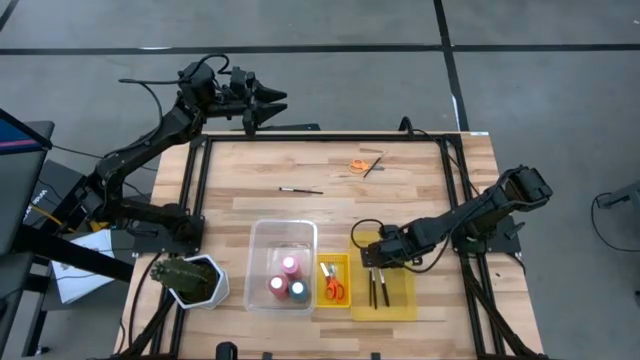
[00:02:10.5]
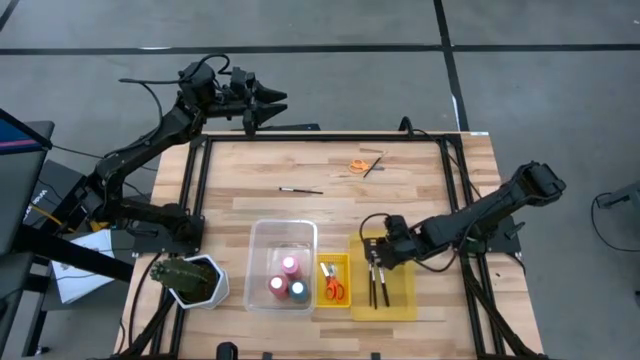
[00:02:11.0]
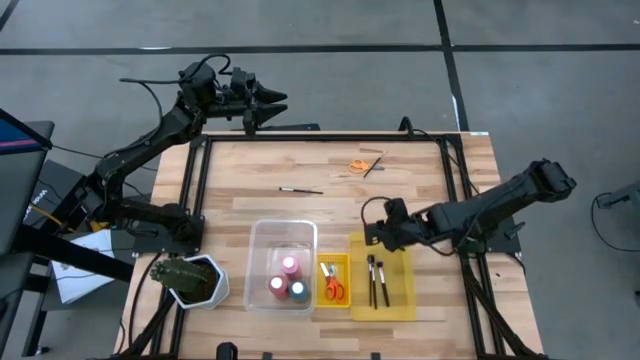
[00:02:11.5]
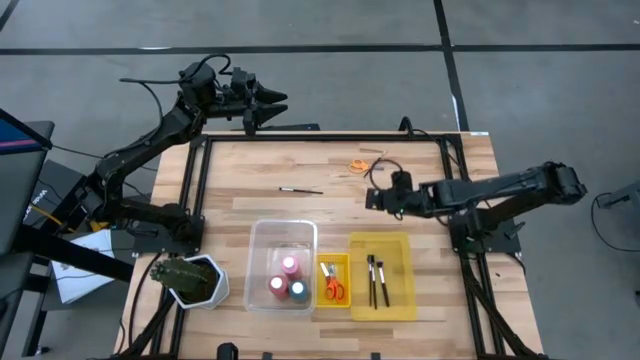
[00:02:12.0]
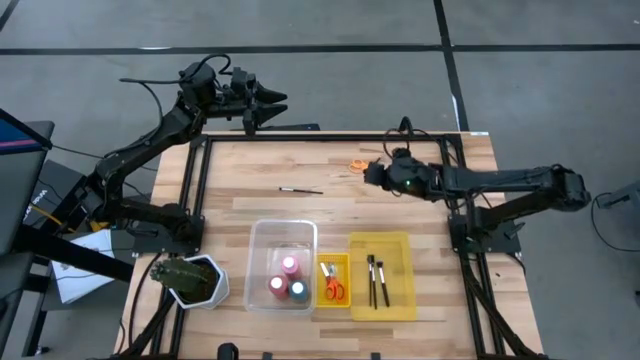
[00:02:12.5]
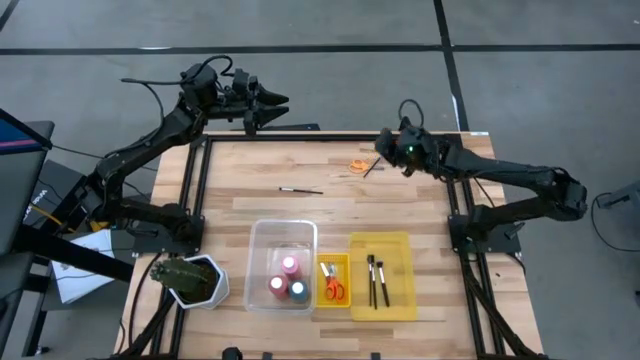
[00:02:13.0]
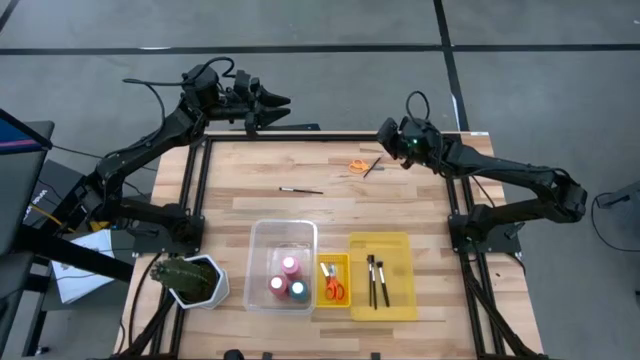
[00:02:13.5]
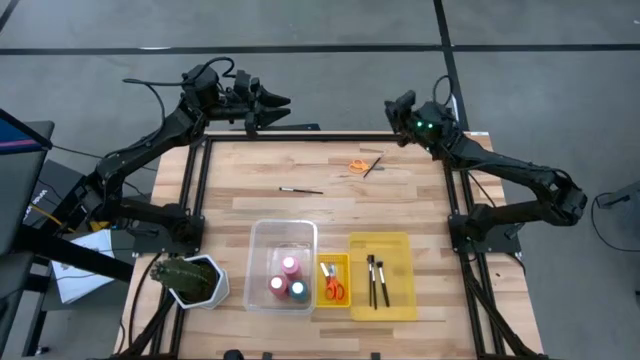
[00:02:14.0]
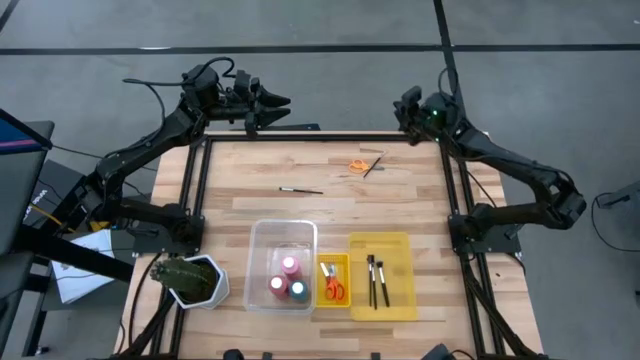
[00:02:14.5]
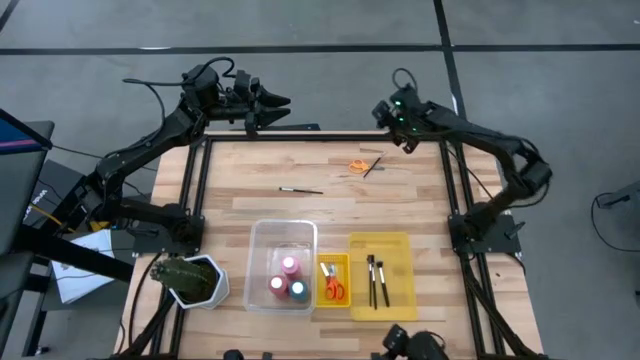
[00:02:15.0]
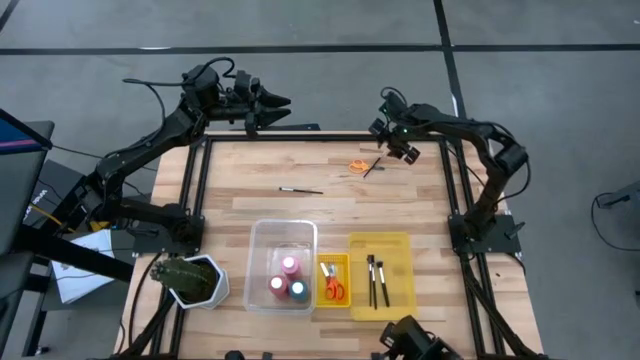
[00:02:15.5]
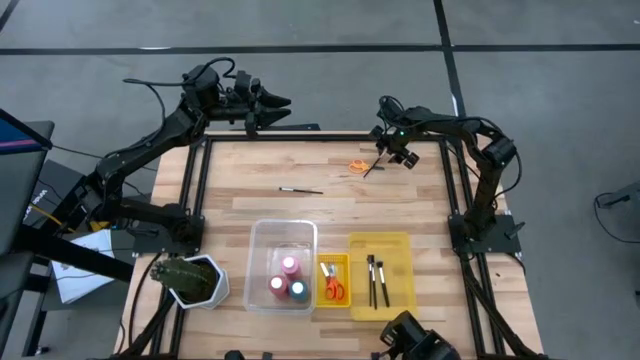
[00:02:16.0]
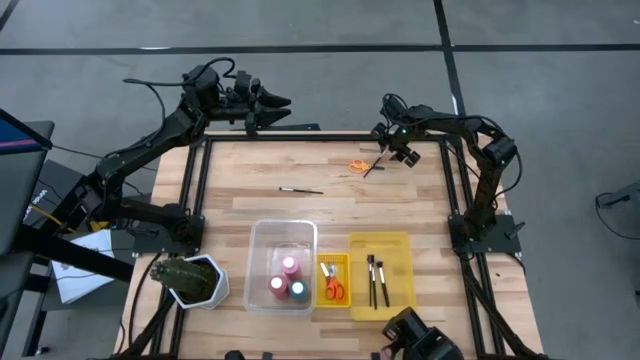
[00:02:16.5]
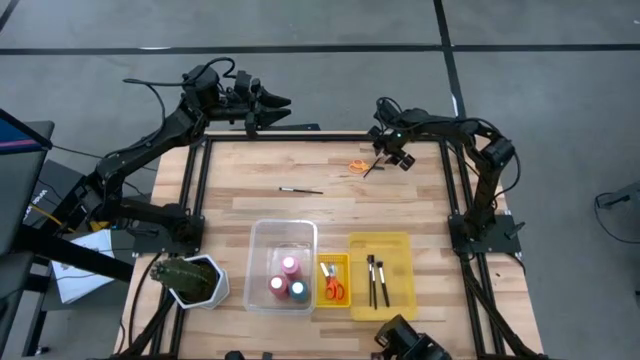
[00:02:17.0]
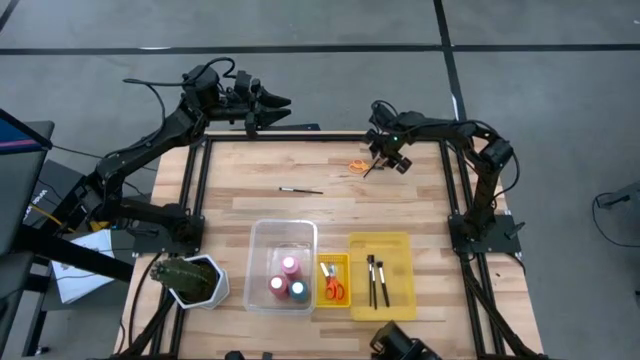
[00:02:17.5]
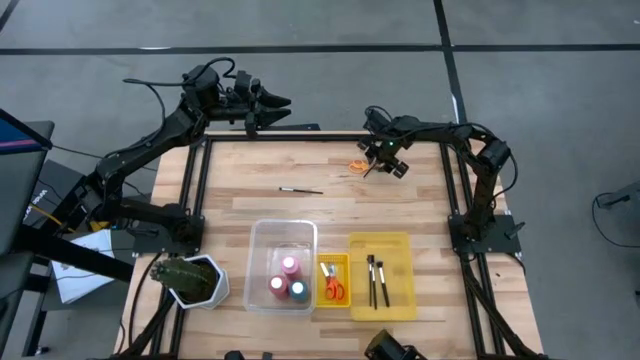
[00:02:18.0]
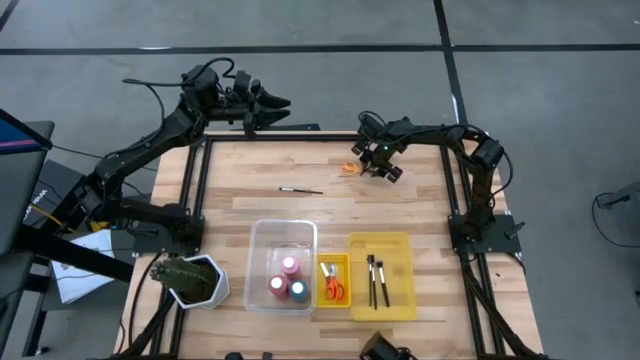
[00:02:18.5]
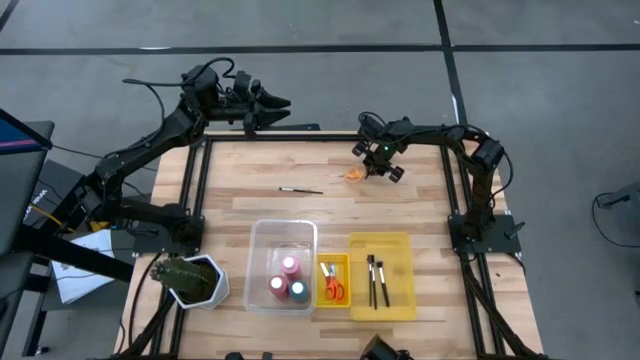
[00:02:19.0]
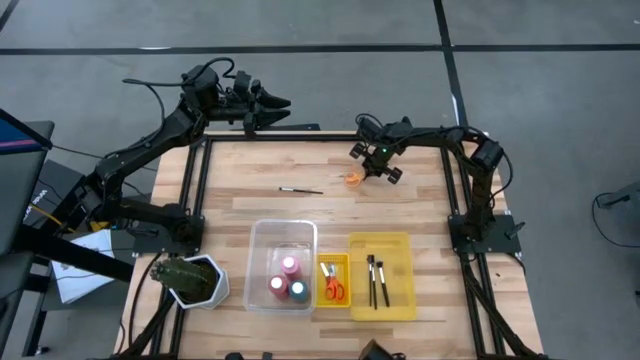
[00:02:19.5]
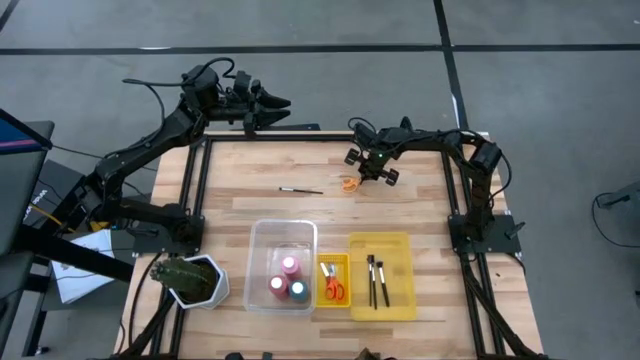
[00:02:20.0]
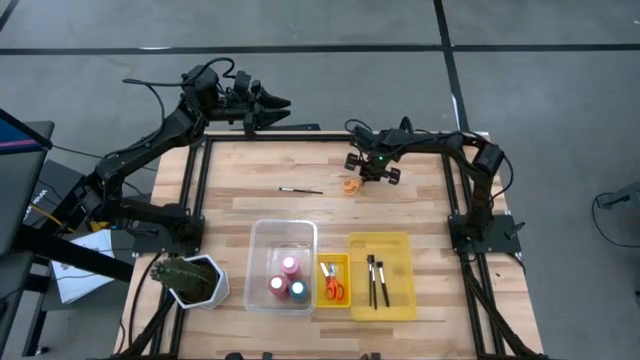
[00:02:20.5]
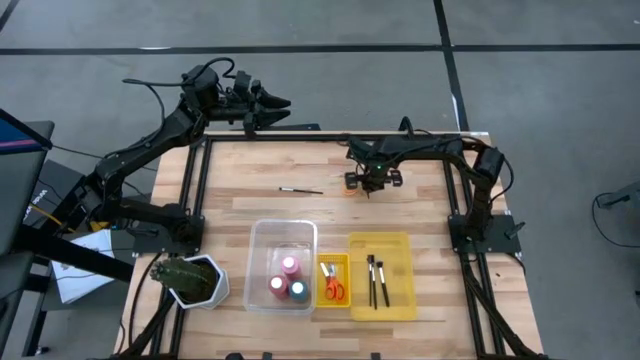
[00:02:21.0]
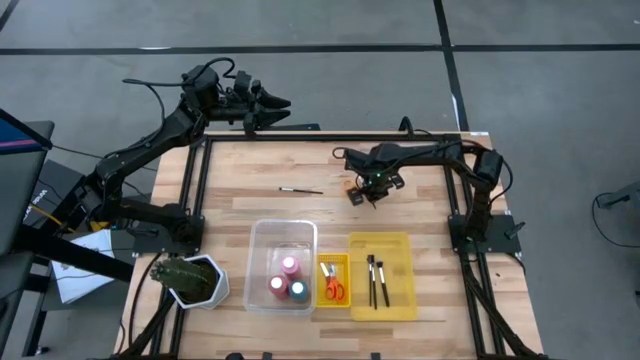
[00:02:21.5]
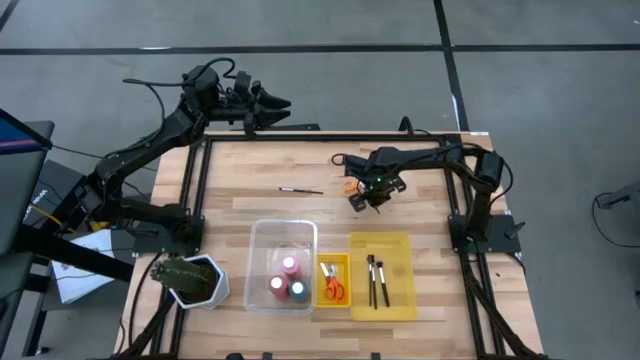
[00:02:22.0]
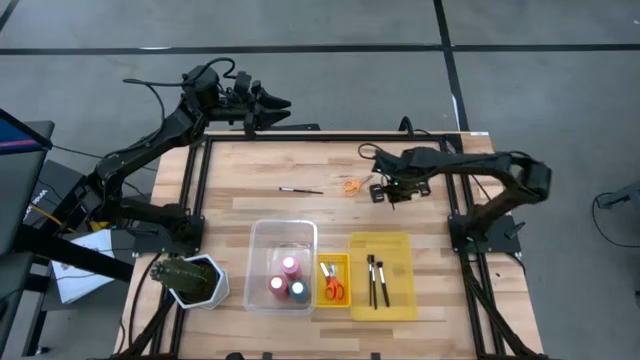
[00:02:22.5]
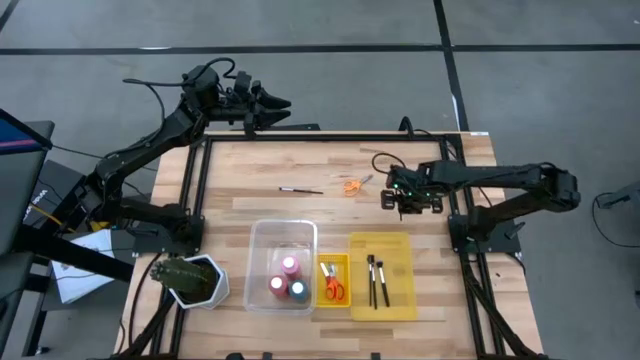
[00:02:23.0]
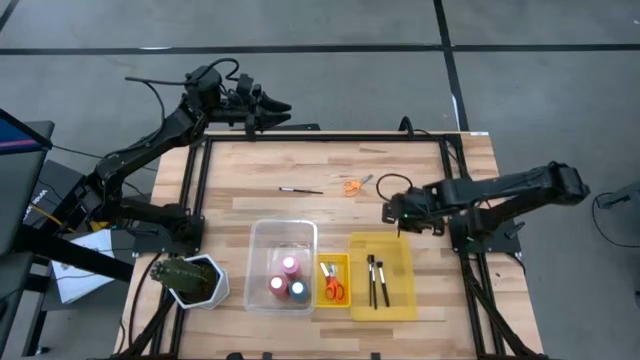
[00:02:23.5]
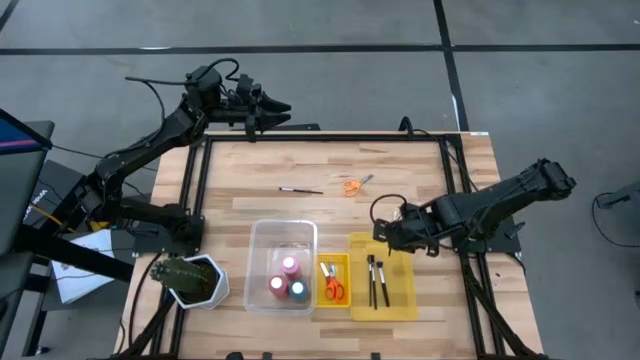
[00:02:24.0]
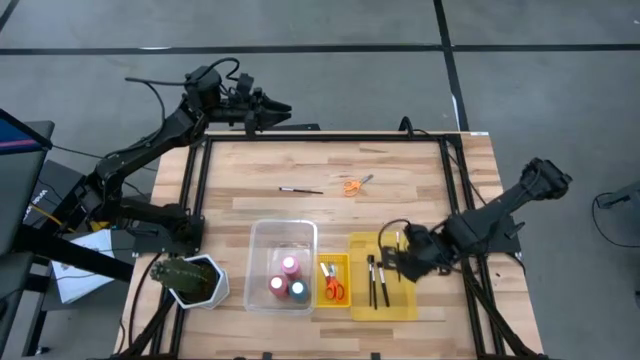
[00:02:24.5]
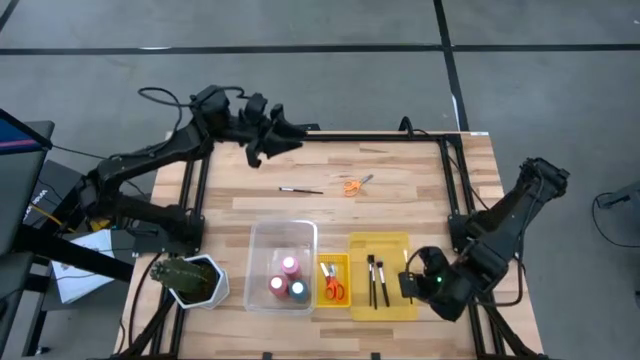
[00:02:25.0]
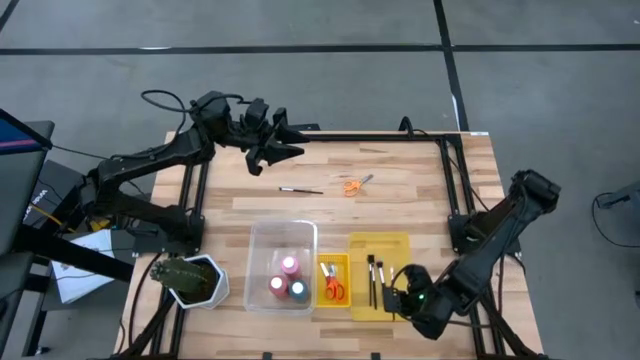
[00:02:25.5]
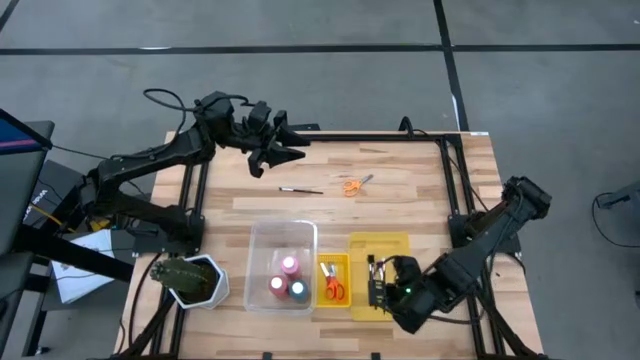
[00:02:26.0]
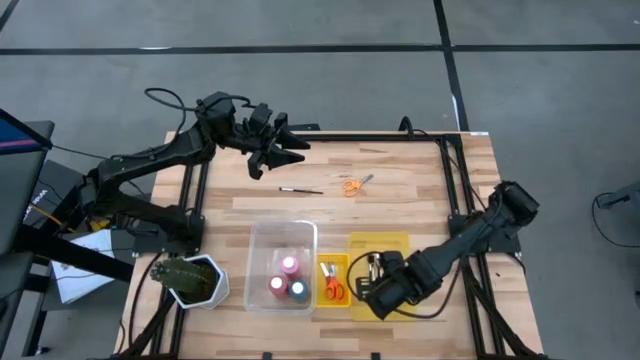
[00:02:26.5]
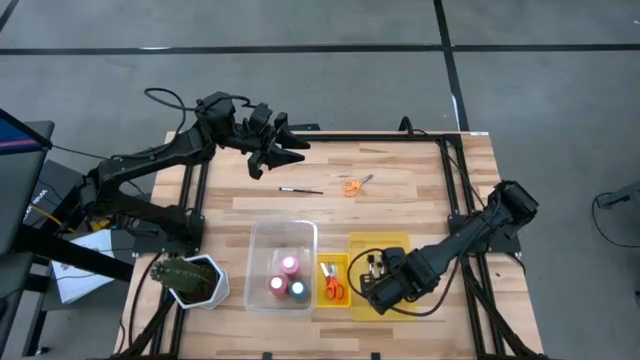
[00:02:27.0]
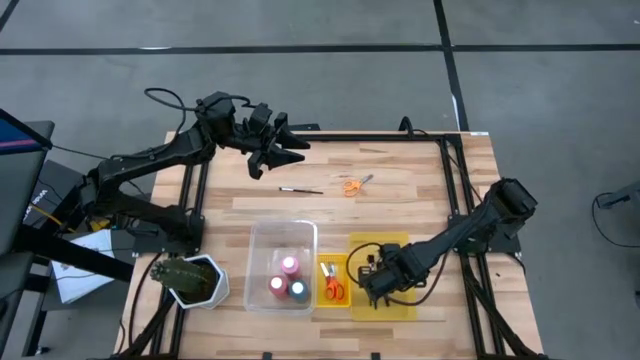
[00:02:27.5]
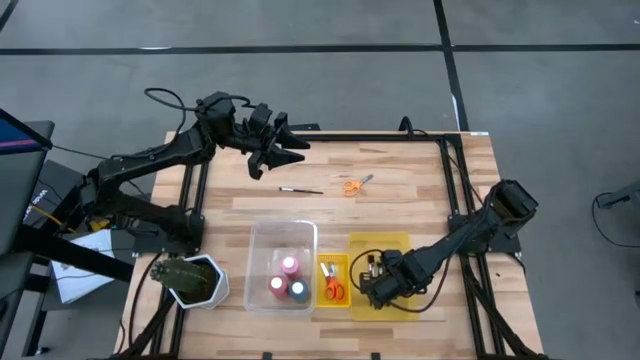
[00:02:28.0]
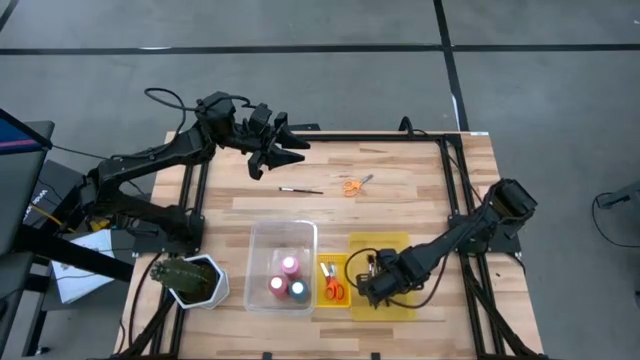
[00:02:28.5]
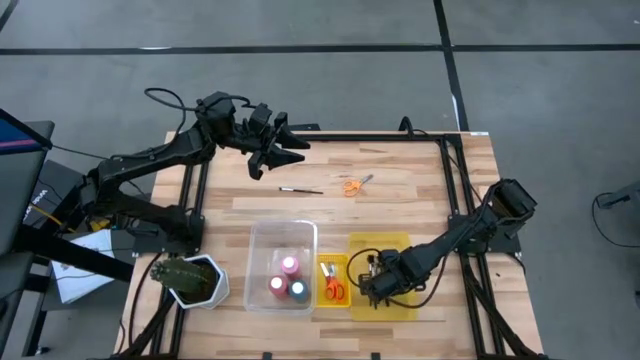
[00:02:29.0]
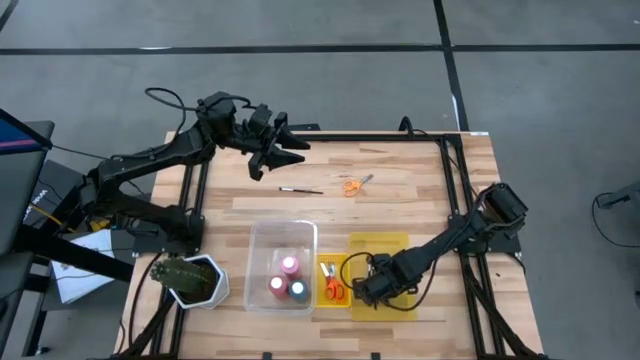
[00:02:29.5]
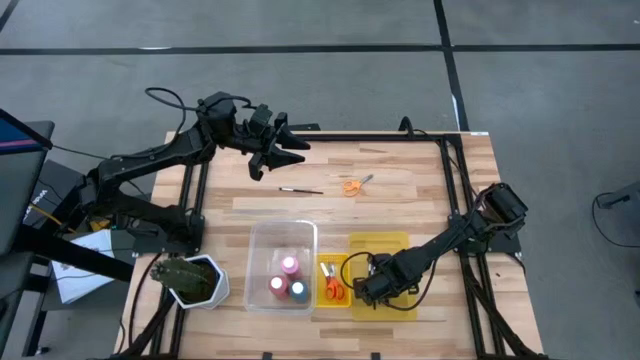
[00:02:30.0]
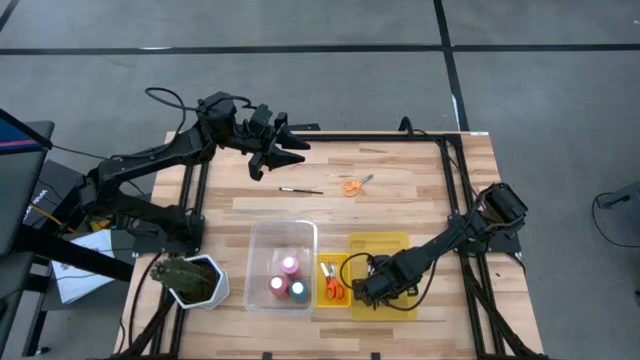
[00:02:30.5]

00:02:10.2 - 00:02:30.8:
Task: Pick & Place Paint Supplies
Put the black paint brush into the right yellow bin
